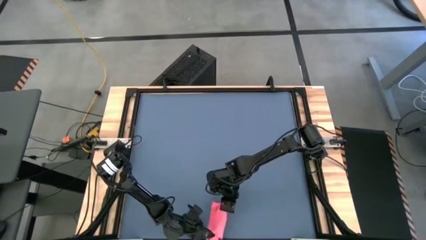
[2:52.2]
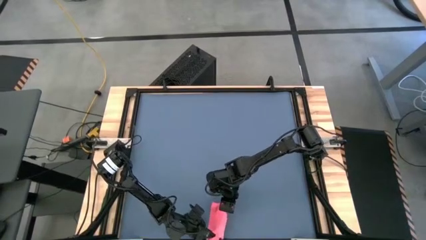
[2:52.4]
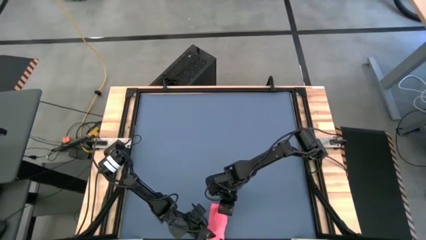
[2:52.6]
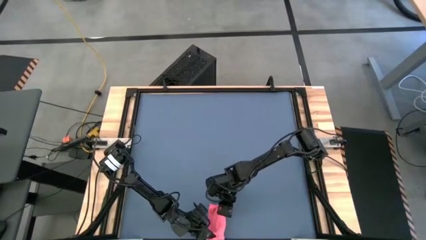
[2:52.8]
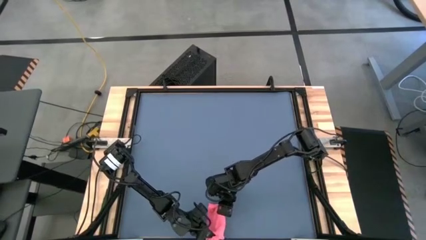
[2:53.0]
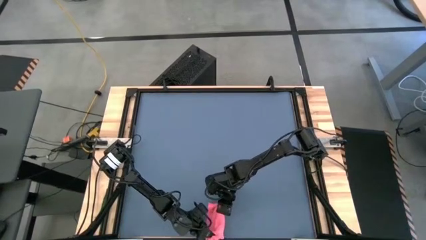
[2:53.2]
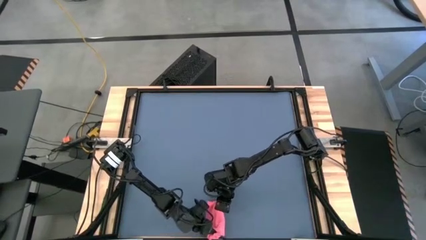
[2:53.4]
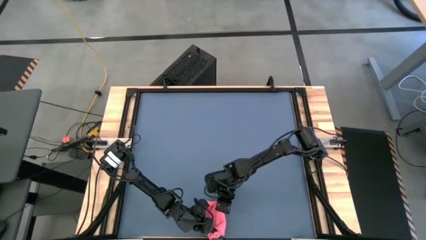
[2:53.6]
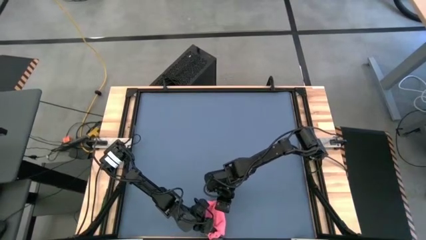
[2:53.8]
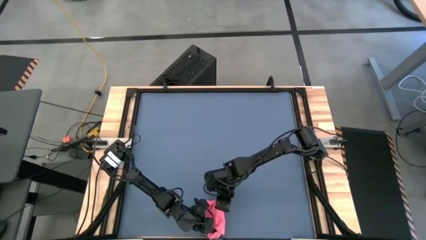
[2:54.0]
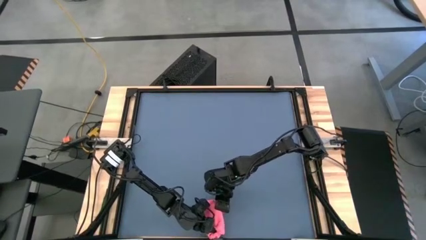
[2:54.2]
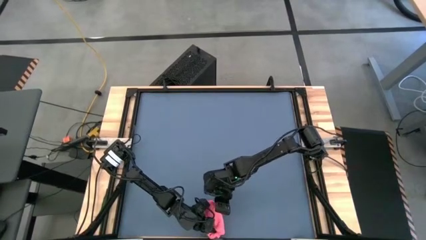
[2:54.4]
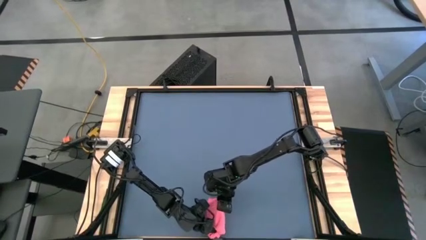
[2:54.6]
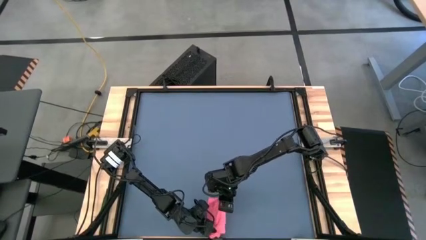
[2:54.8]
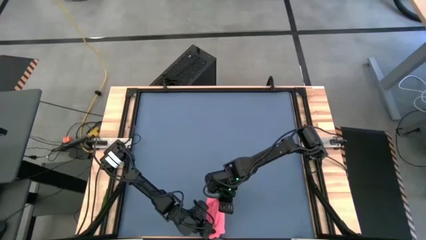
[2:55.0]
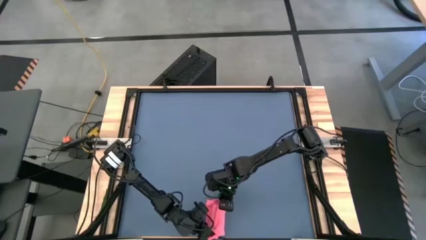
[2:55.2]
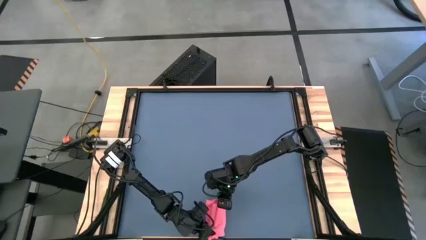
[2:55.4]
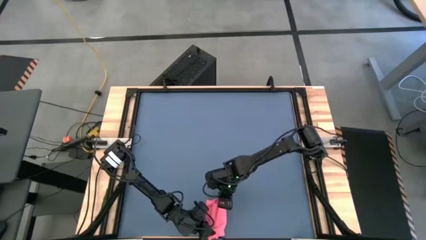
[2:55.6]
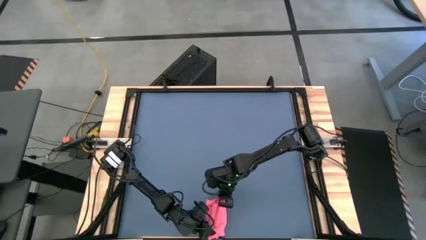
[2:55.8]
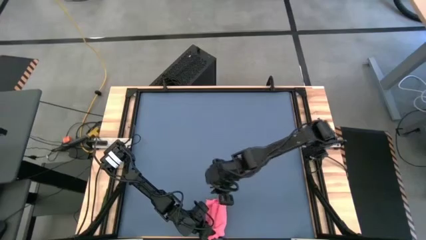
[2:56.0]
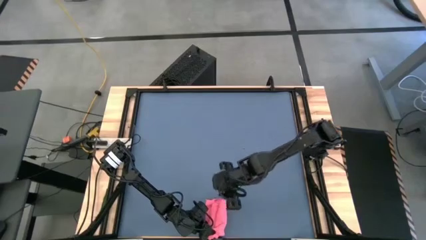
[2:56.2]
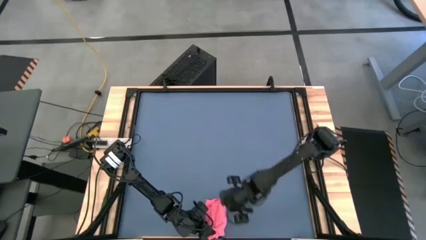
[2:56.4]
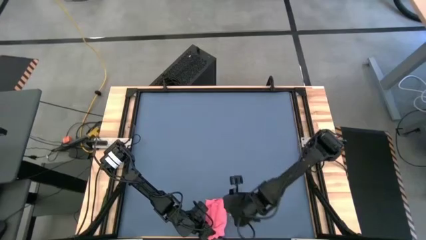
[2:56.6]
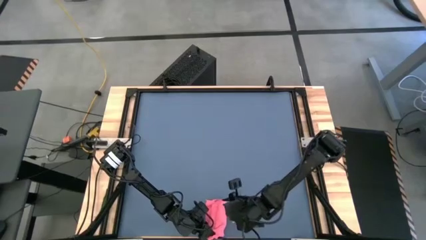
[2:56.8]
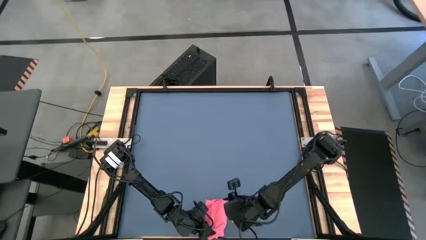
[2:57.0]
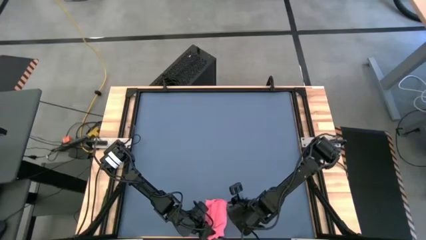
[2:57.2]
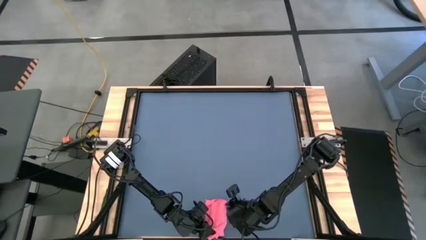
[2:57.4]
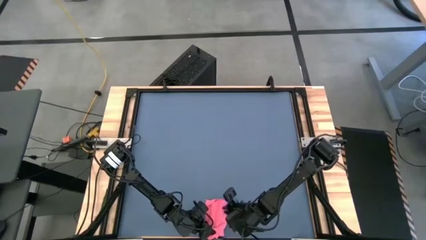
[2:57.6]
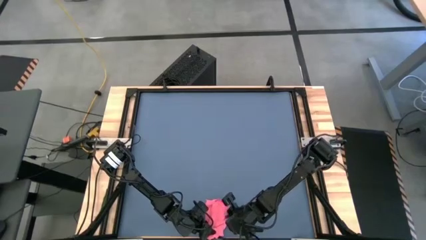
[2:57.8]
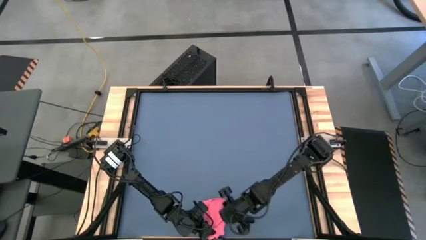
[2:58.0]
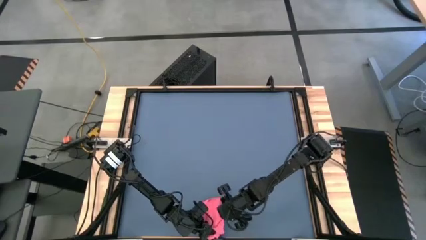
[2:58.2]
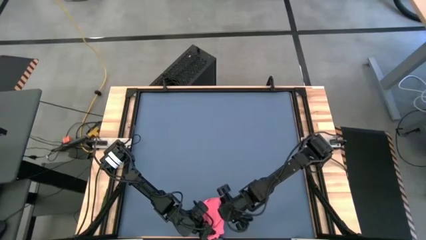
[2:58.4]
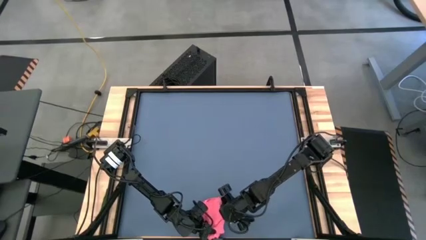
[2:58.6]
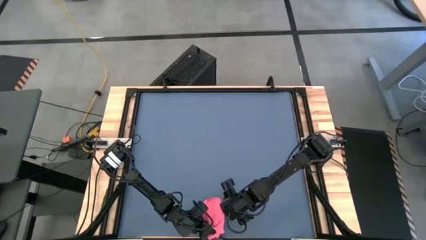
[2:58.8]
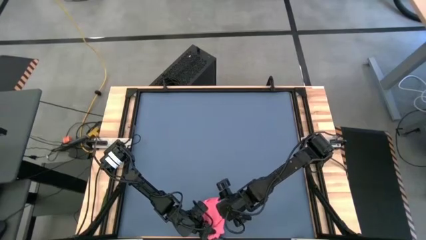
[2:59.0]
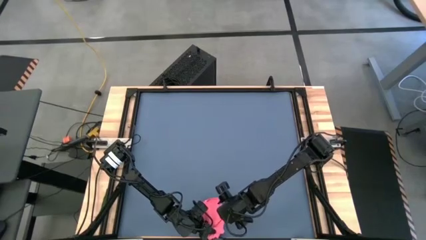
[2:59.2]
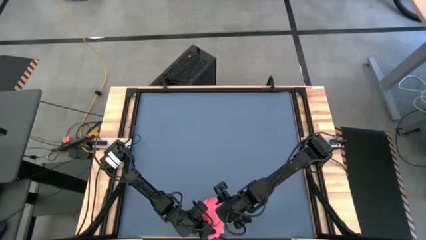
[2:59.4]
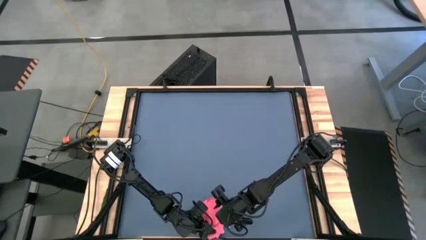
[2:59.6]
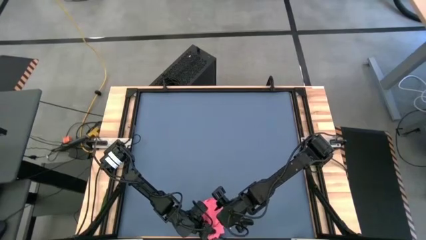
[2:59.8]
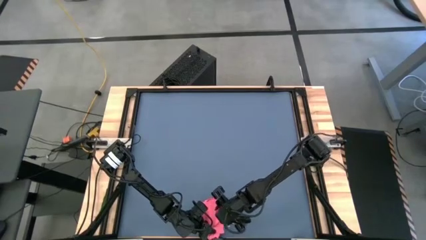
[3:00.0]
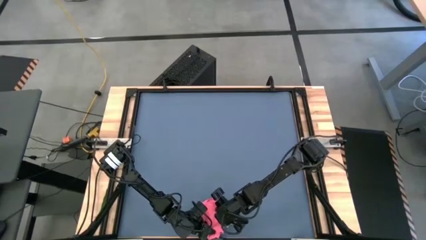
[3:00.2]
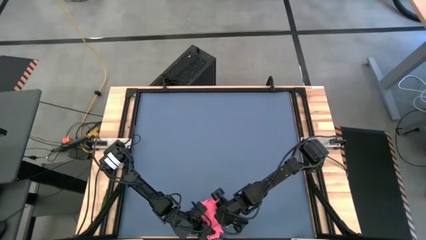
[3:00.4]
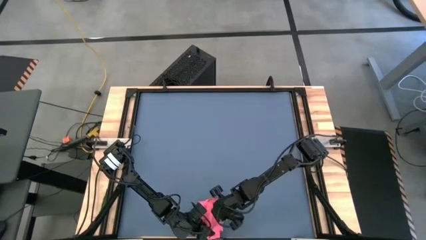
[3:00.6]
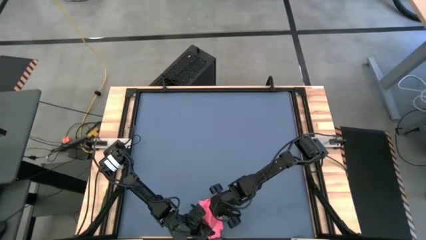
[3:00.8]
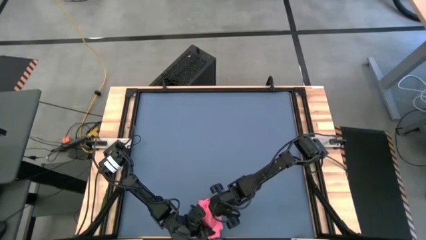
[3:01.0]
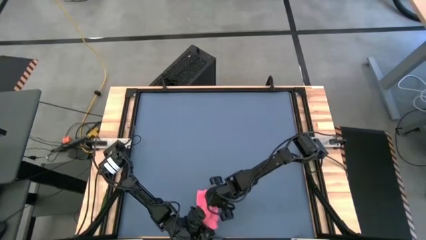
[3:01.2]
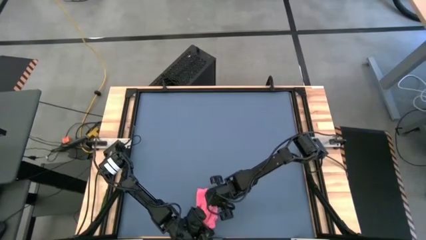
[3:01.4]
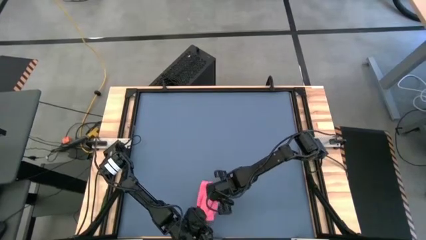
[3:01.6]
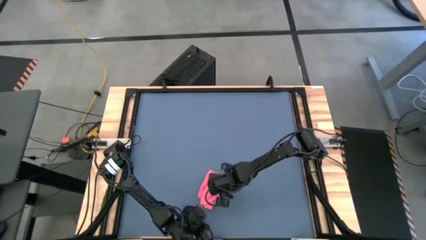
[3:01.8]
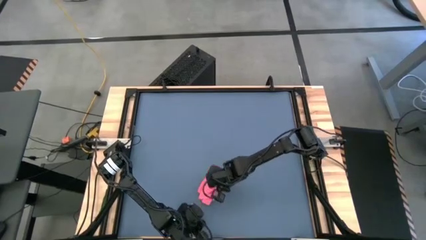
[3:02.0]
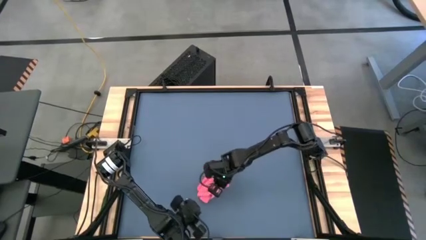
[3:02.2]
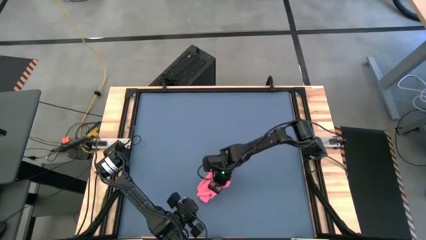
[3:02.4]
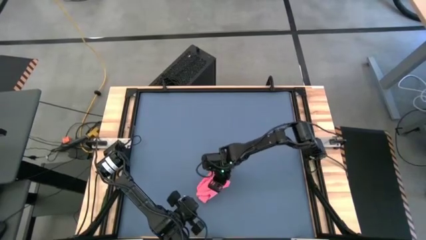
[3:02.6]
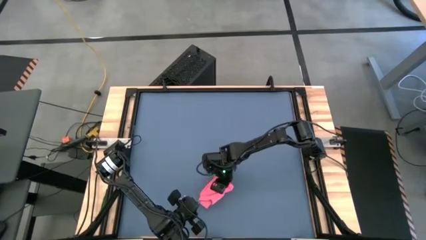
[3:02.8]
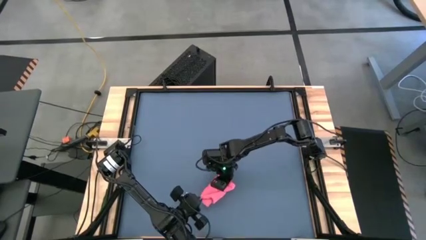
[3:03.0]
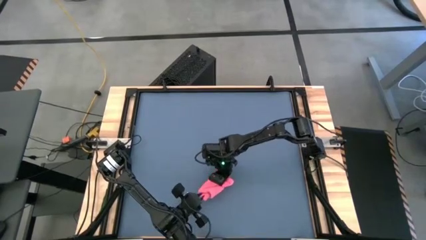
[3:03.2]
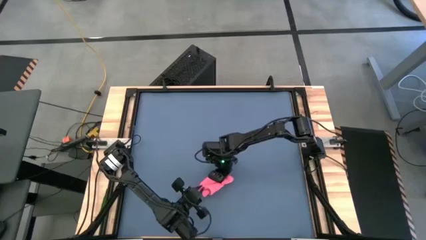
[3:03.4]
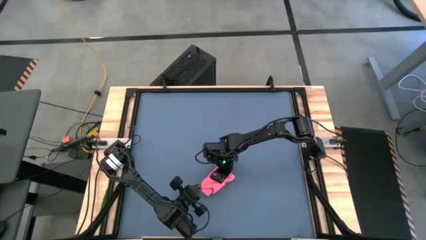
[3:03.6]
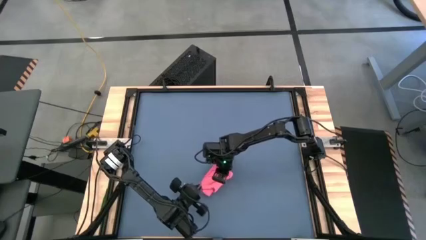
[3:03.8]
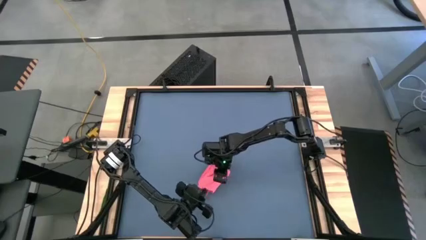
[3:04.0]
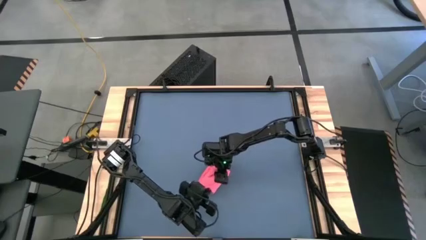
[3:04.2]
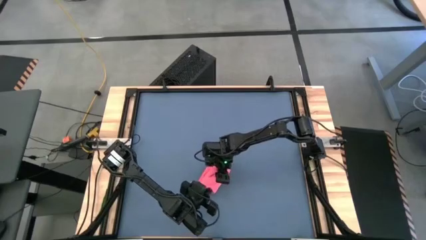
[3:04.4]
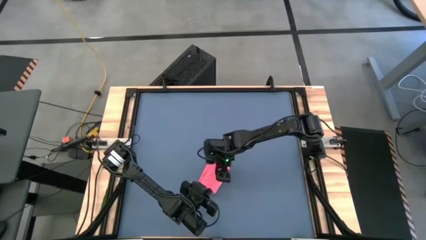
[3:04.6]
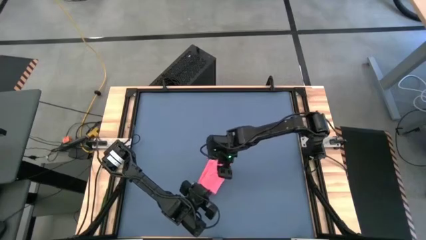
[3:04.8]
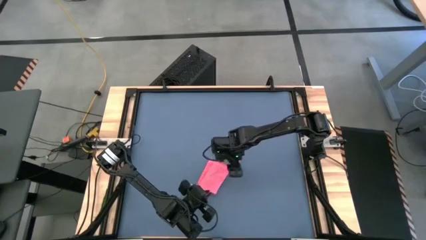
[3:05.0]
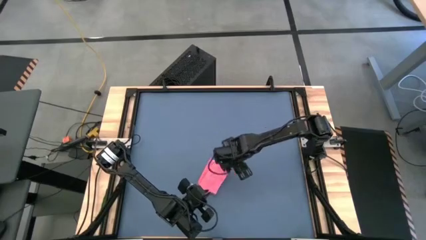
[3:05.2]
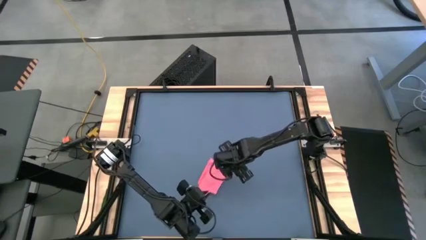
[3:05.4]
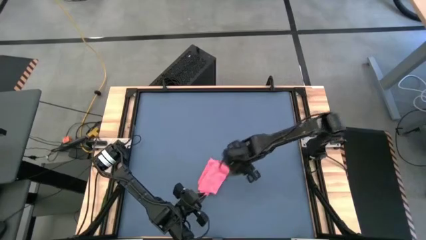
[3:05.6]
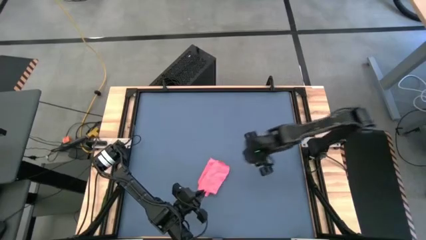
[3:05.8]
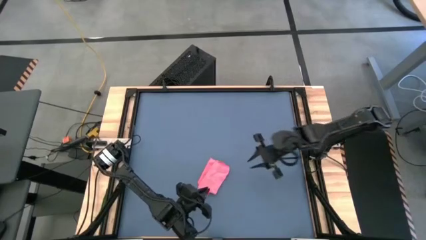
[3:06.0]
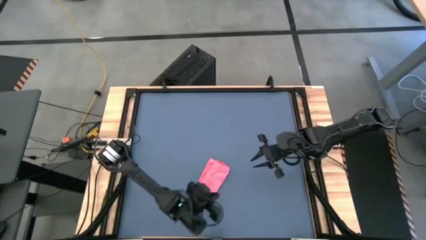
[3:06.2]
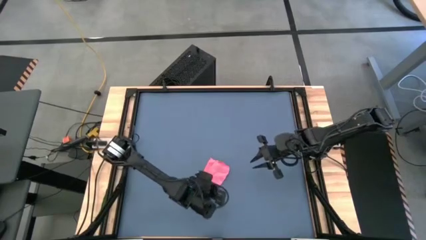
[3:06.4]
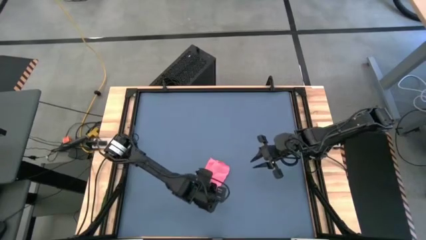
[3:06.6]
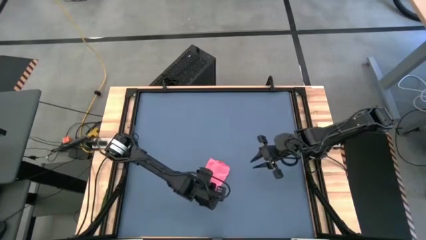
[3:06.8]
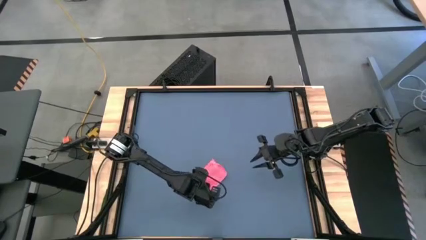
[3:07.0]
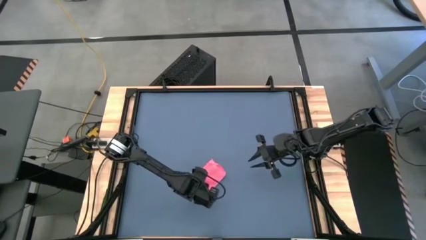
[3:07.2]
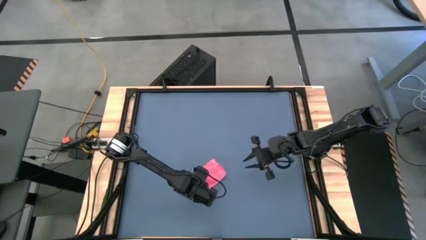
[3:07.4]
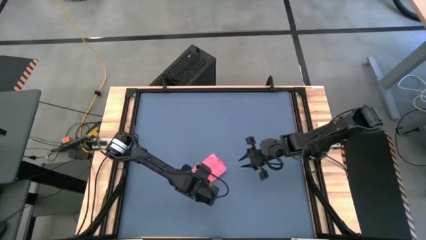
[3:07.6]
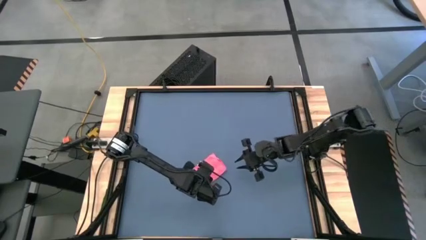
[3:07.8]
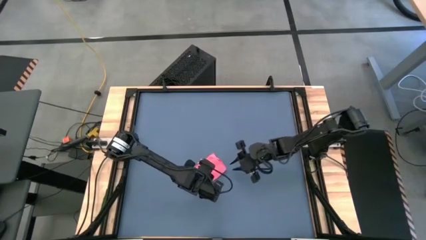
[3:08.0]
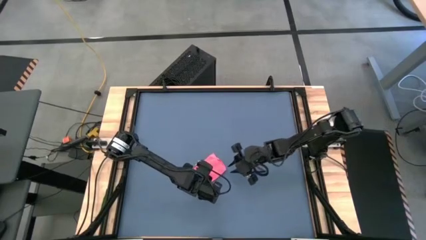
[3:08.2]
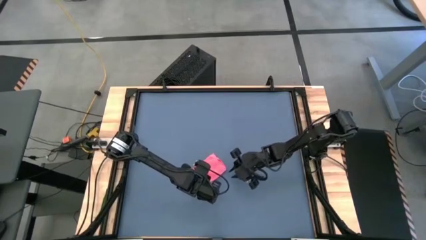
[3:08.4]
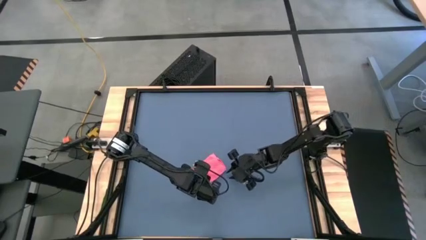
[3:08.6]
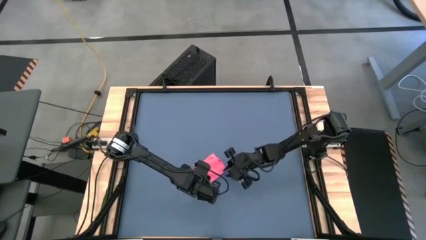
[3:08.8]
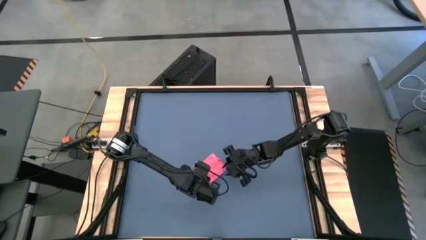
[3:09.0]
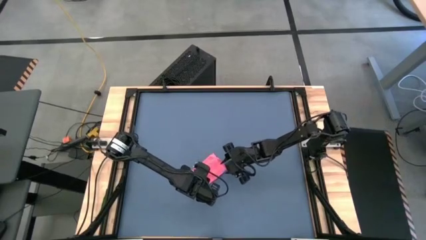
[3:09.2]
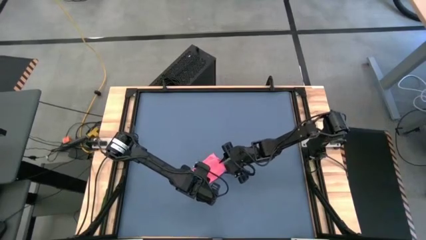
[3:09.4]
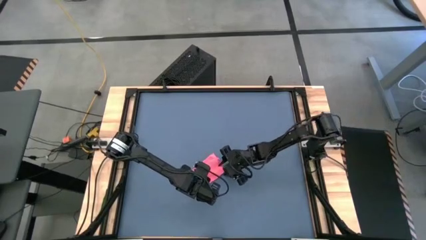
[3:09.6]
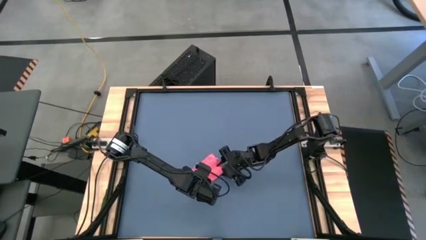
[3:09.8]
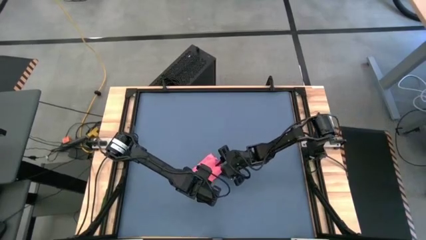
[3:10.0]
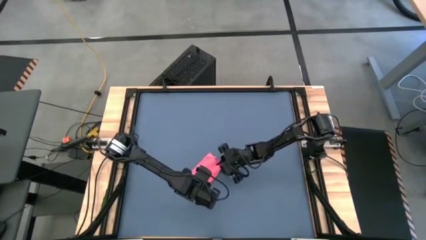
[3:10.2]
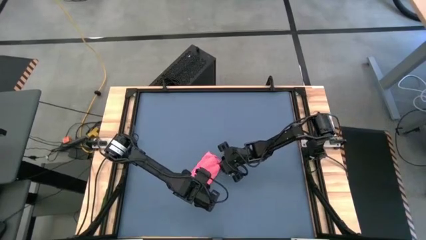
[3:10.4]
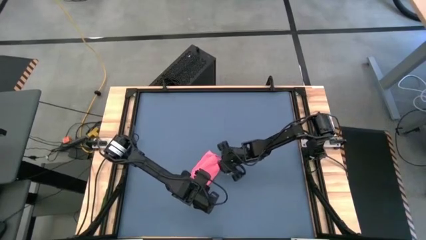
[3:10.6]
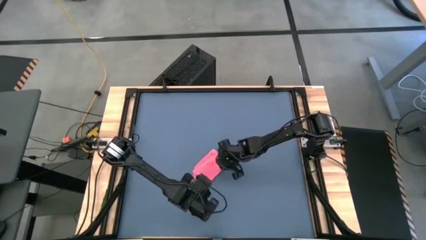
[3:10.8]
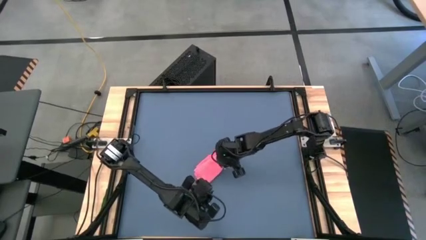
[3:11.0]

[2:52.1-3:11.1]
Task: Roll towel
Roll the pink towel
